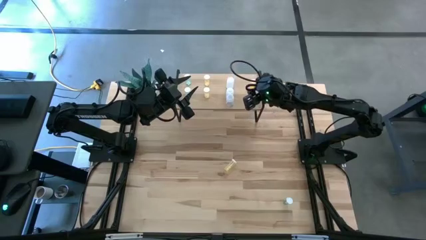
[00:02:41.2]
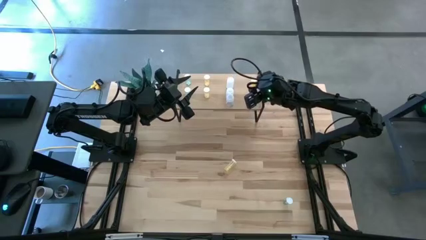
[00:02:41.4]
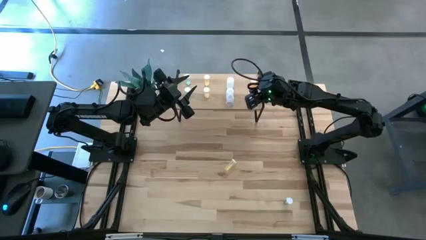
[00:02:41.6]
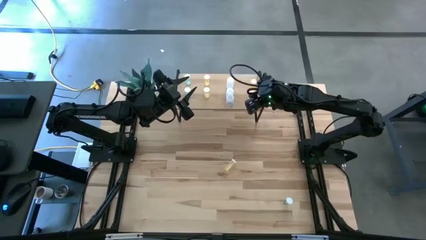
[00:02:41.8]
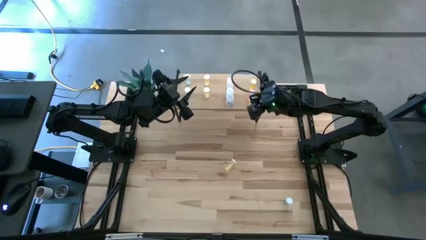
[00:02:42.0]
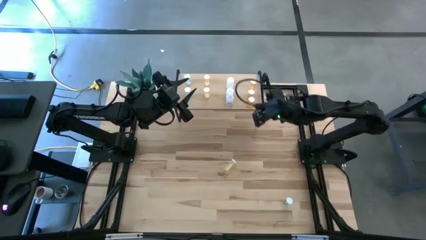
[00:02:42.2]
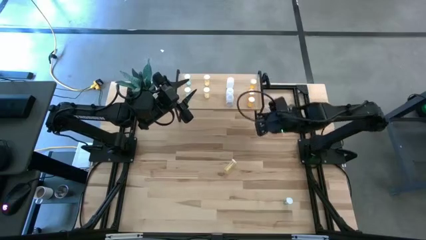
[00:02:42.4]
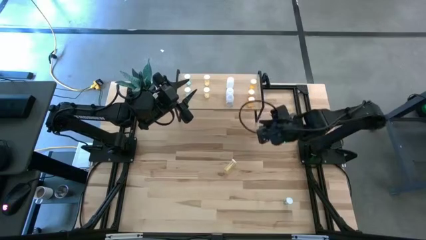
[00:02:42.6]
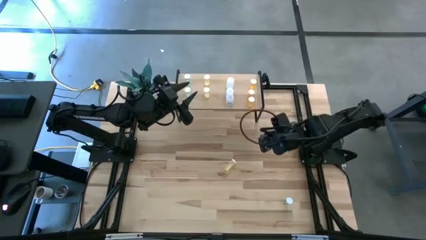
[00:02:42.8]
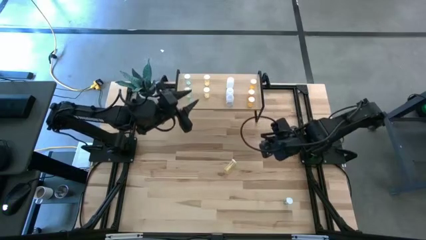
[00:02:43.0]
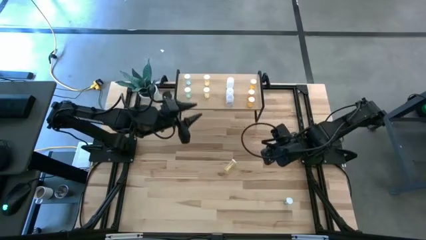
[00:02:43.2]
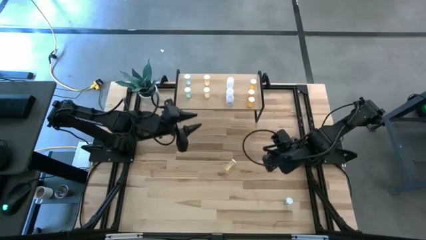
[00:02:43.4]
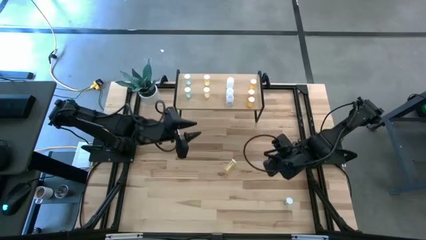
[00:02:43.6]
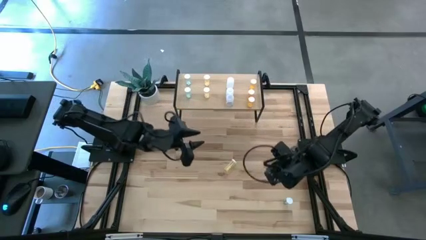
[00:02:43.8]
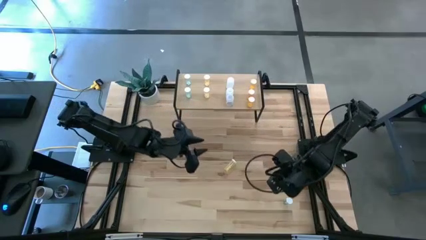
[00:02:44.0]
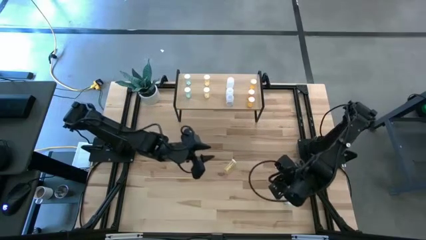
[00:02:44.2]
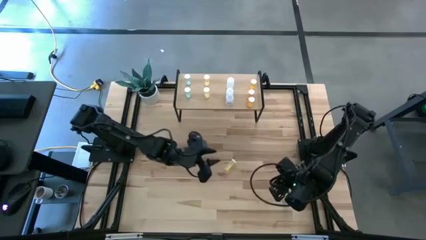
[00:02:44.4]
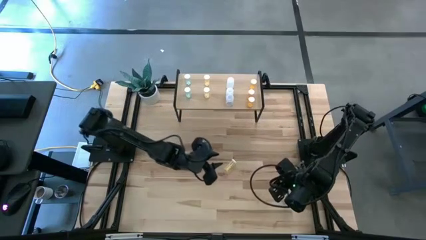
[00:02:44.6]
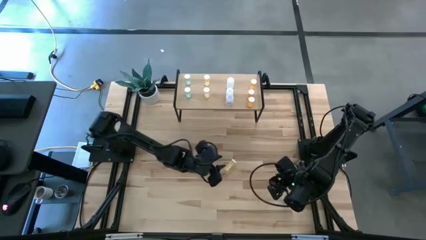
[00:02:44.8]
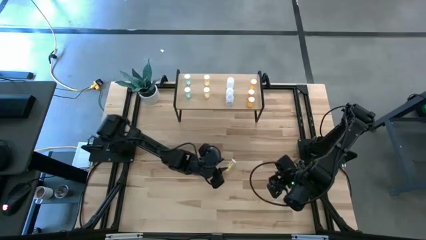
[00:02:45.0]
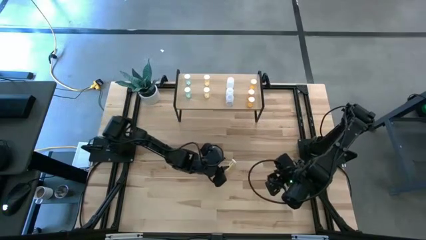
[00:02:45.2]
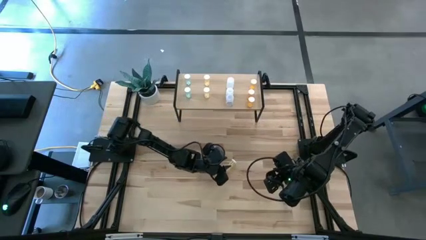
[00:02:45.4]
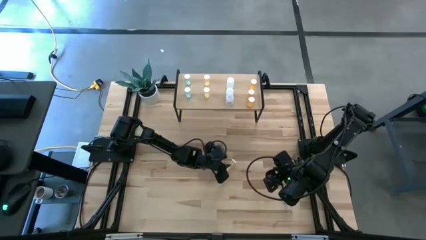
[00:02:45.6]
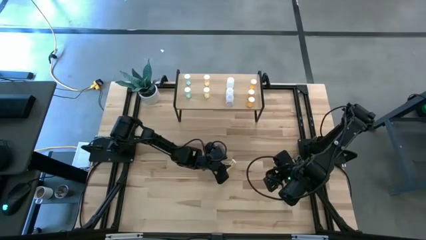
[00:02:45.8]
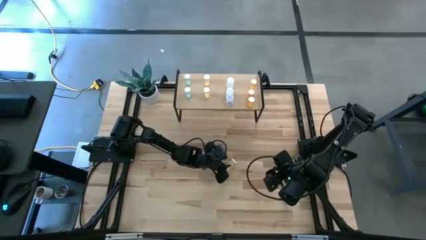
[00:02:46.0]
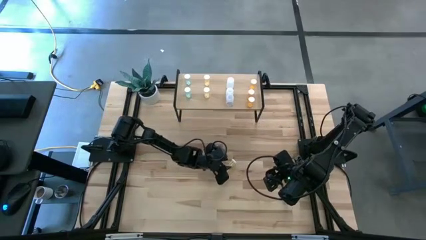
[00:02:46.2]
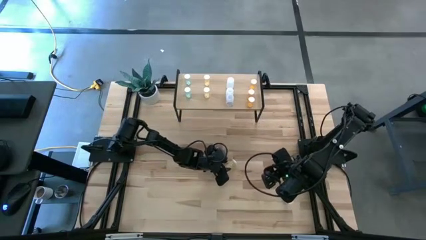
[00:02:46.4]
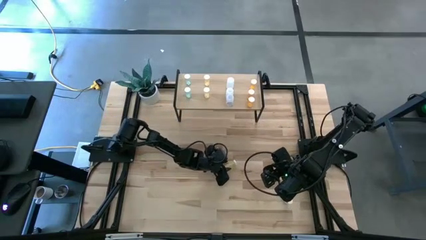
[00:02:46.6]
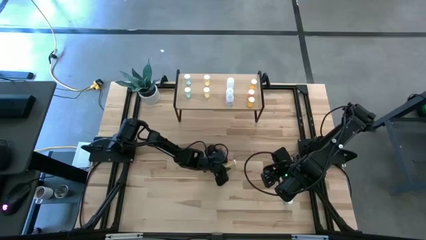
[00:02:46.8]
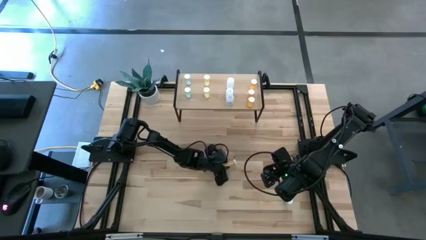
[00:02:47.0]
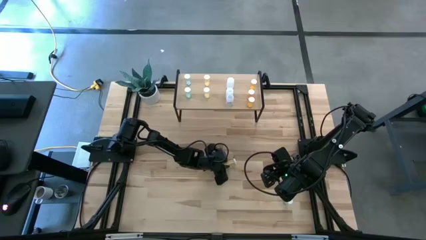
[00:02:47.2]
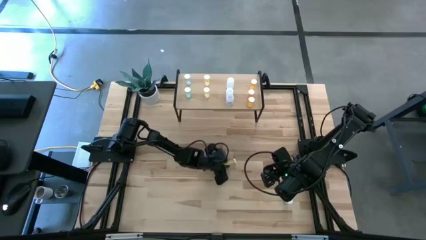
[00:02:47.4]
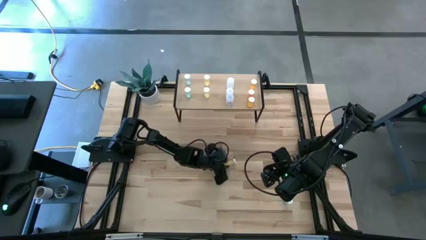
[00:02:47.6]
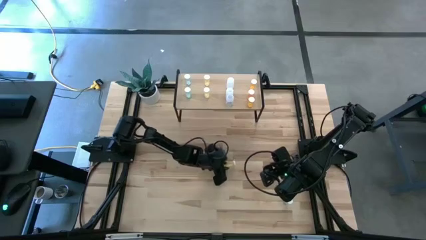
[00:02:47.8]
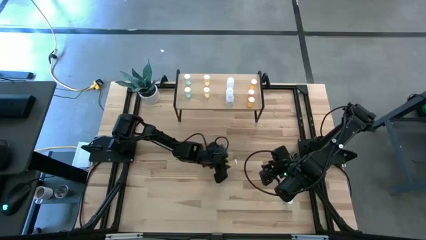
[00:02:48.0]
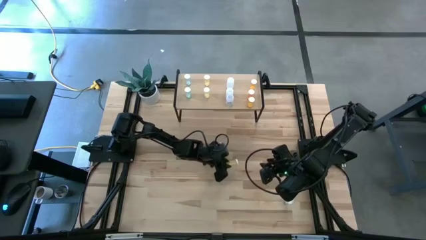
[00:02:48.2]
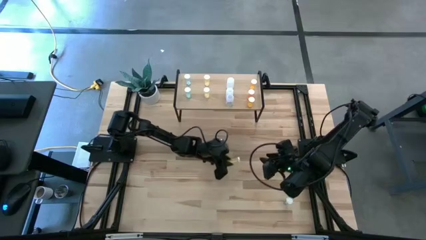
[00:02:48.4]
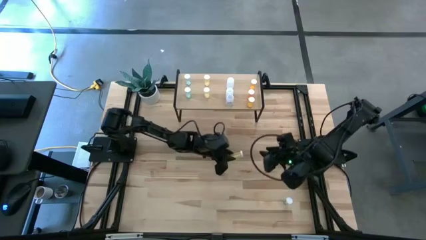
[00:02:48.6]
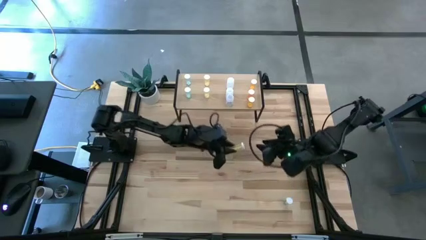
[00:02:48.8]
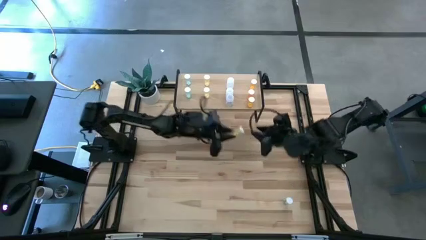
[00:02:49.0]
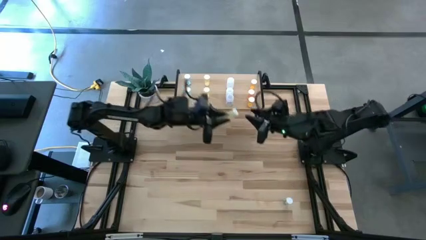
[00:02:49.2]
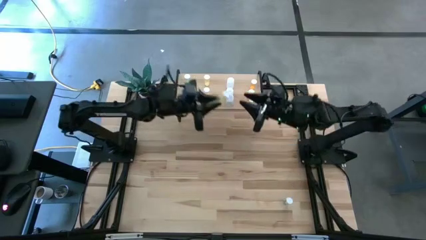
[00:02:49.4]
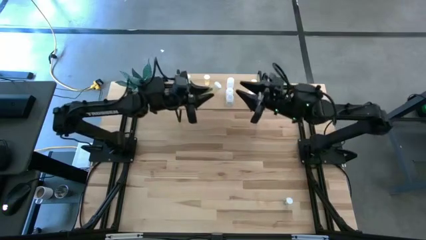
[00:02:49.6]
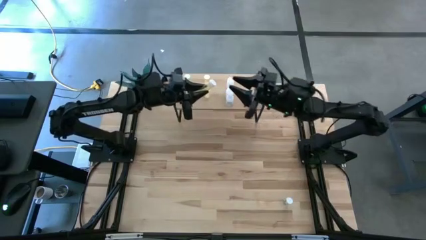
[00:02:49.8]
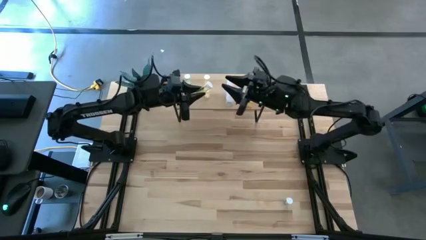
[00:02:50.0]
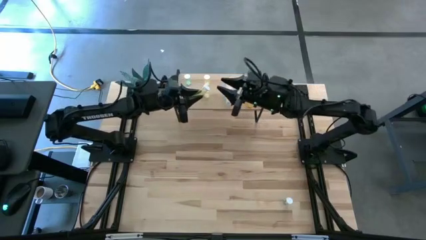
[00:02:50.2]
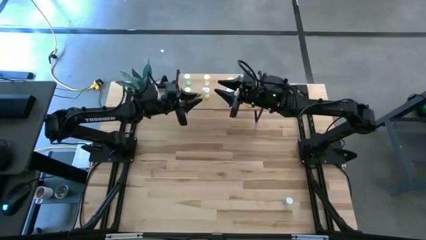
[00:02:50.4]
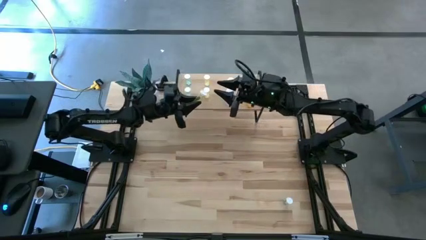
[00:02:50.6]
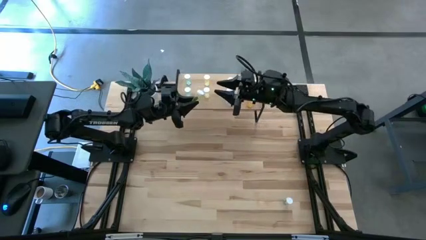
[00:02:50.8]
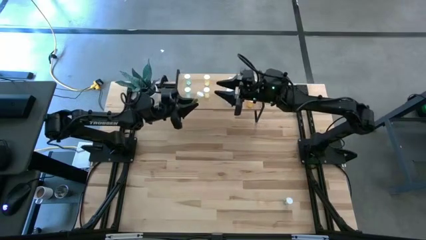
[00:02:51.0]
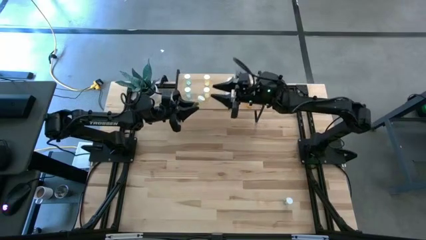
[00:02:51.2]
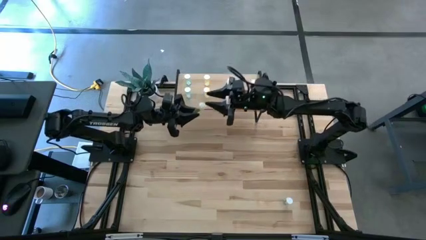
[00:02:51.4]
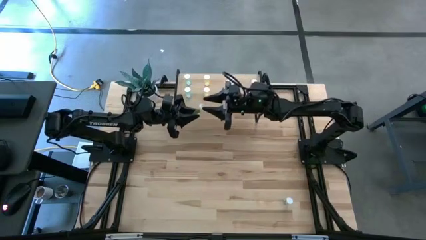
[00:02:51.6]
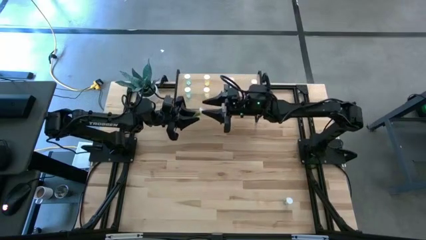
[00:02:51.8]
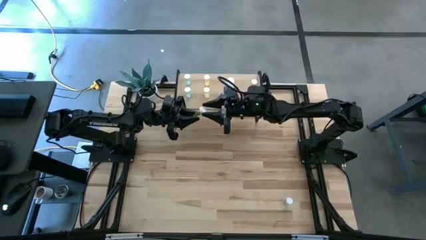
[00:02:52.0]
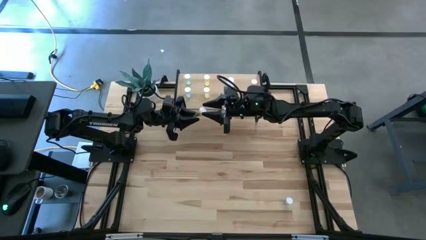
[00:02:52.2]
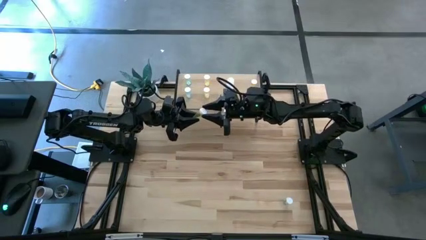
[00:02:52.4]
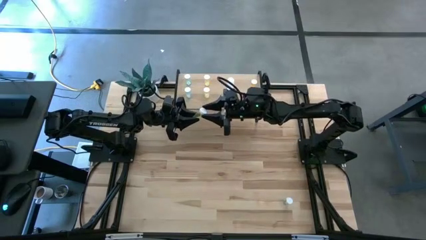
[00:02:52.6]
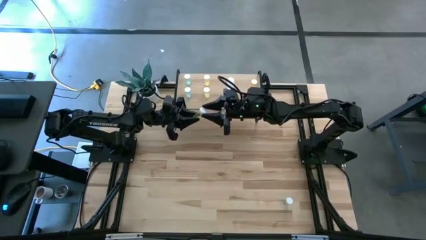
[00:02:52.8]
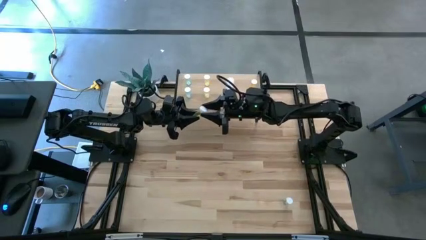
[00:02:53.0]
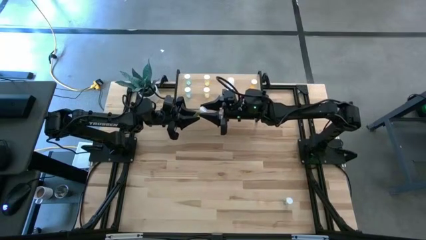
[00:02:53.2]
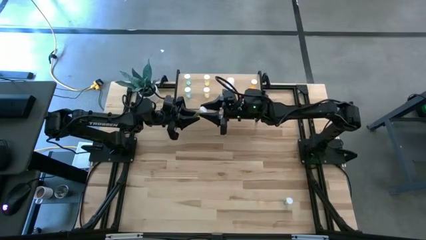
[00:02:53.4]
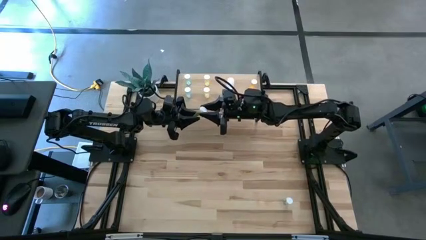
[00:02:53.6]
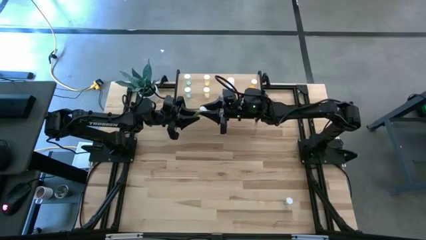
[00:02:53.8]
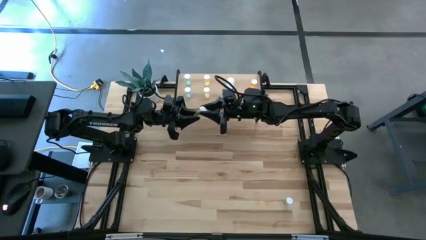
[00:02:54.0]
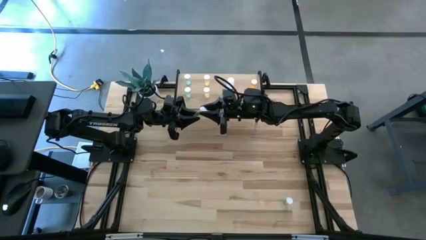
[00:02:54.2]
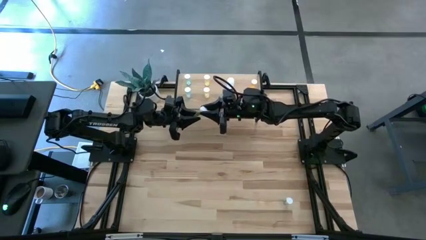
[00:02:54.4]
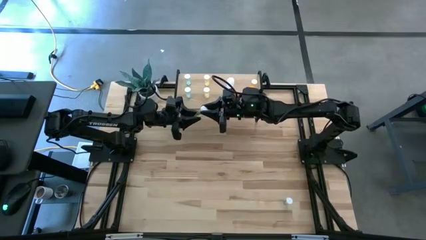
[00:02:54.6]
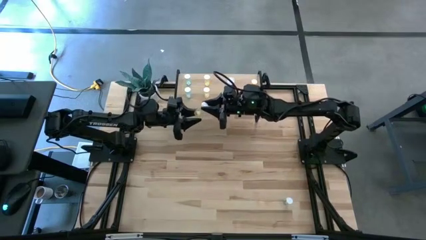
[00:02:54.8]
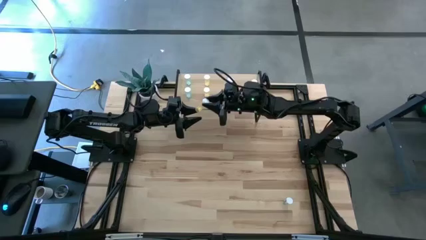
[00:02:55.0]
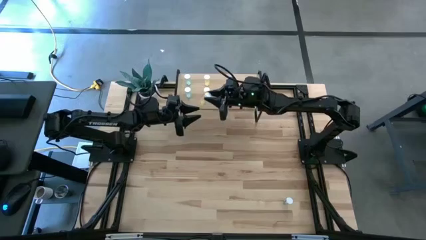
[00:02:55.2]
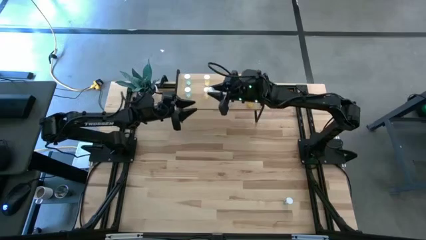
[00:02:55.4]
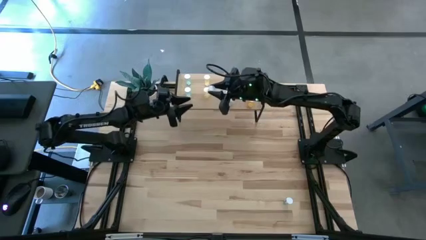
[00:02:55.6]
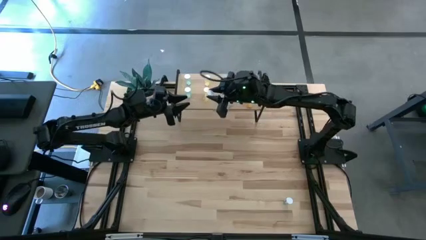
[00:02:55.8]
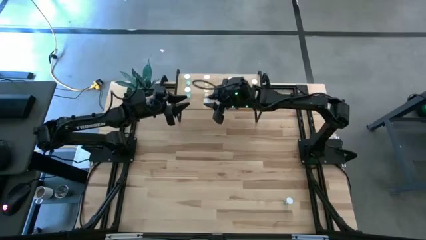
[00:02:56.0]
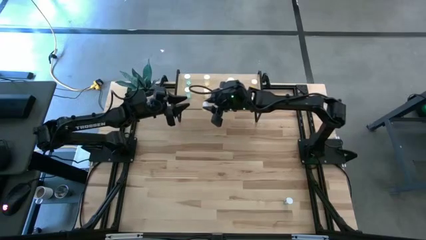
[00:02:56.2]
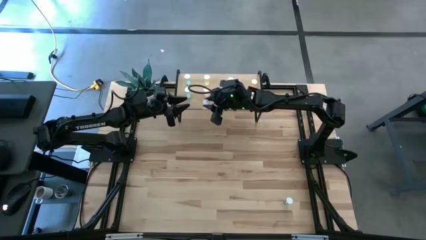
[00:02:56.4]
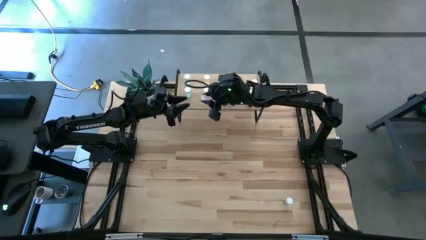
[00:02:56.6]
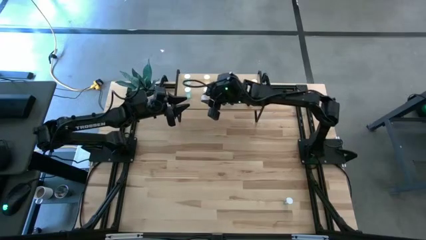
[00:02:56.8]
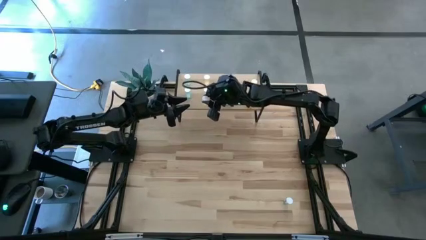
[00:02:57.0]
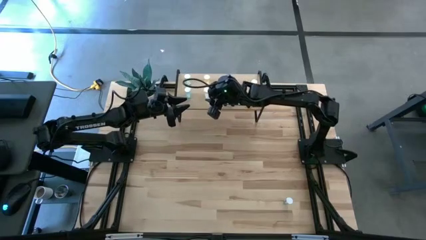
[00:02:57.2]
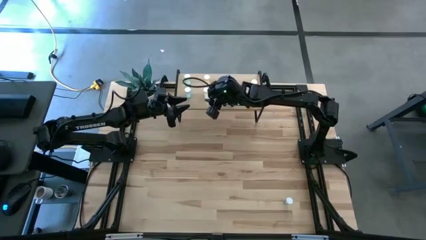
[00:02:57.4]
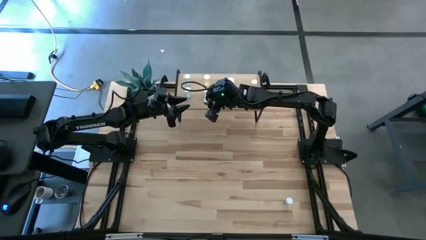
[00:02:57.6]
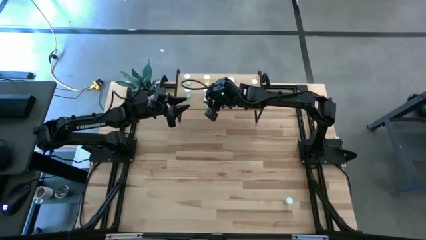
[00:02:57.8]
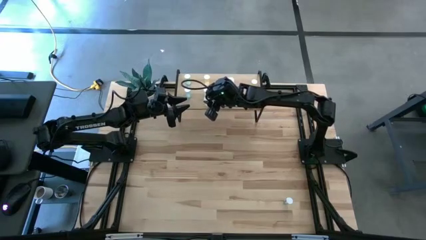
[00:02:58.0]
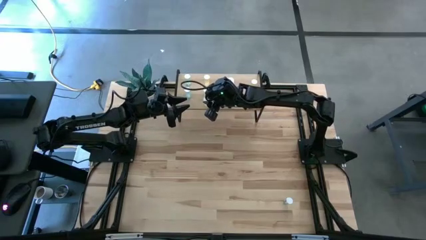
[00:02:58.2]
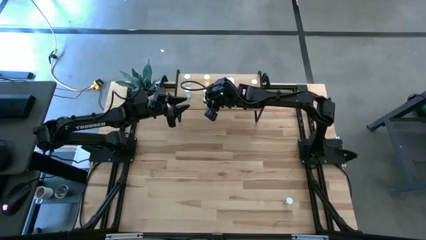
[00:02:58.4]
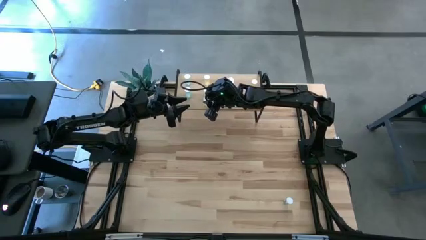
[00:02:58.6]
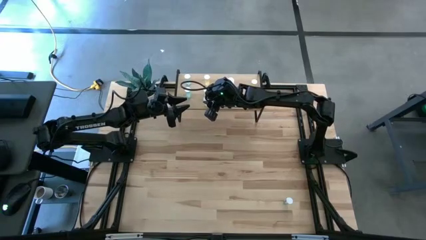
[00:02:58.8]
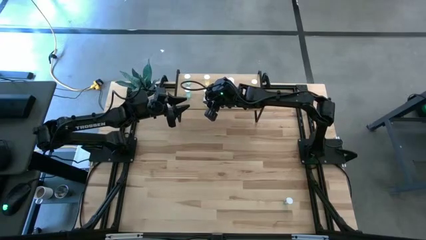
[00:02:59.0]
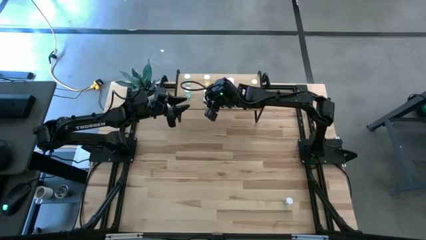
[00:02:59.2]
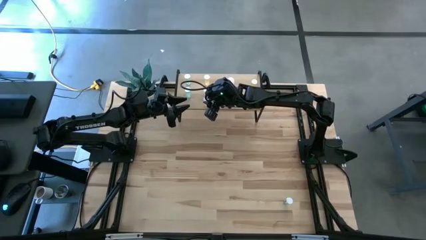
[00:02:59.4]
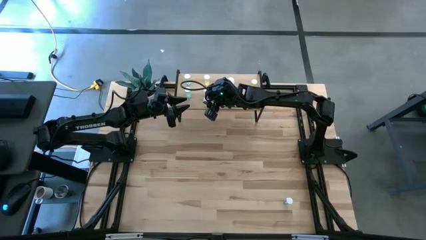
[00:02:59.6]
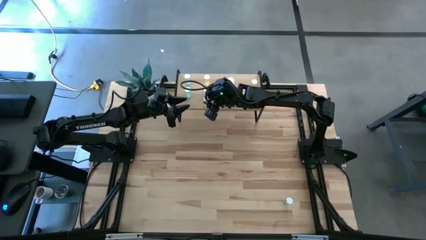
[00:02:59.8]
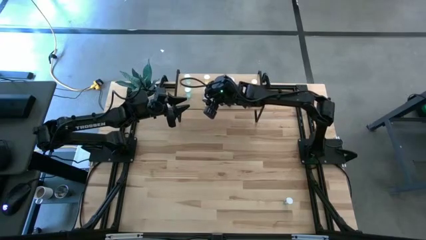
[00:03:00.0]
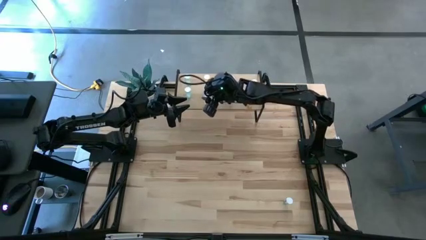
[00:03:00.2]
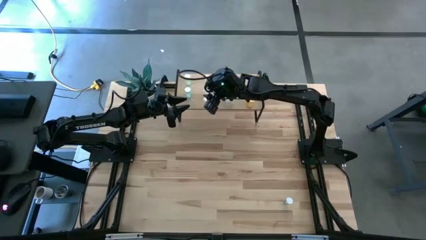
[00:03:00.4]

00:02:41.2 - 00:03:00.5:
Task: Pick and place medicine bottles onto shelf by color
Put the yellow pill bottle aligned with the other yellow pill bottle on the shelf
